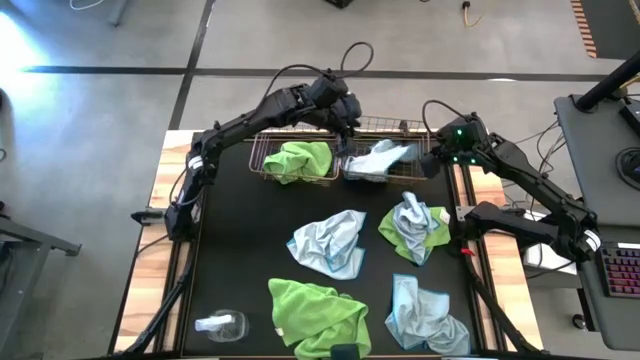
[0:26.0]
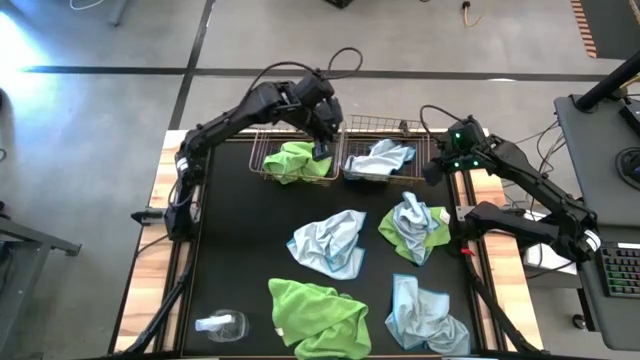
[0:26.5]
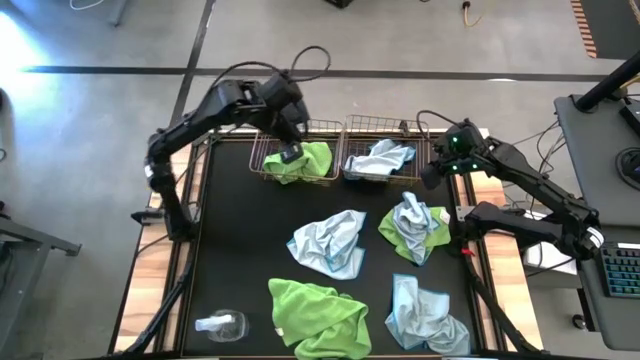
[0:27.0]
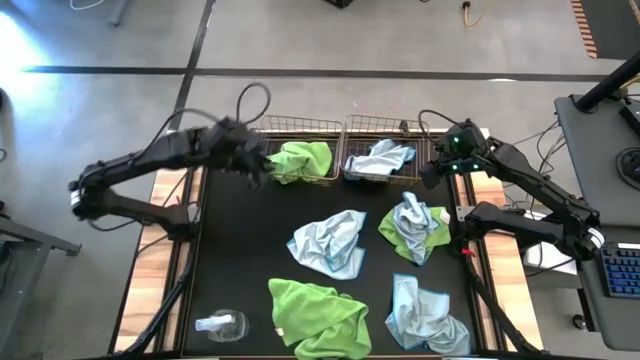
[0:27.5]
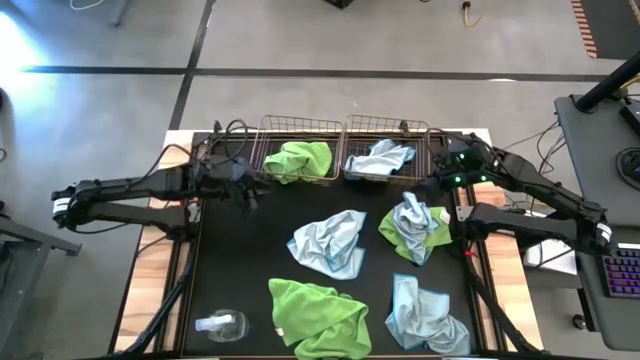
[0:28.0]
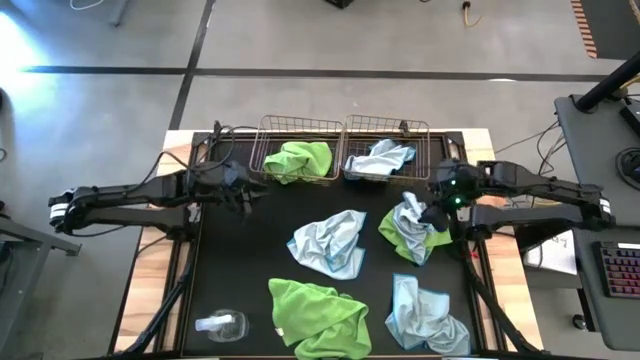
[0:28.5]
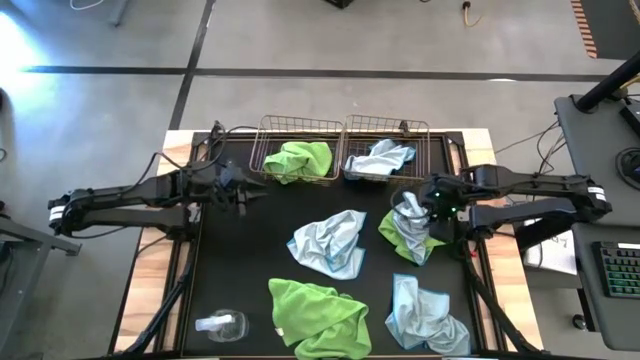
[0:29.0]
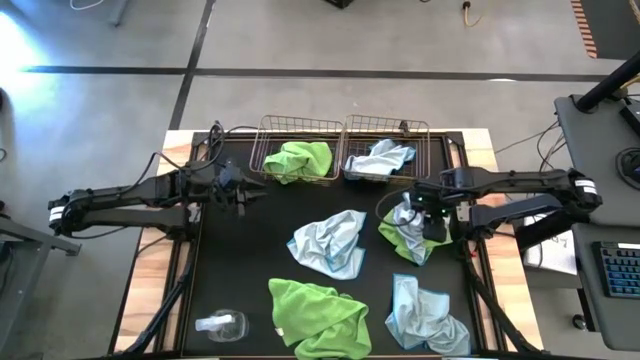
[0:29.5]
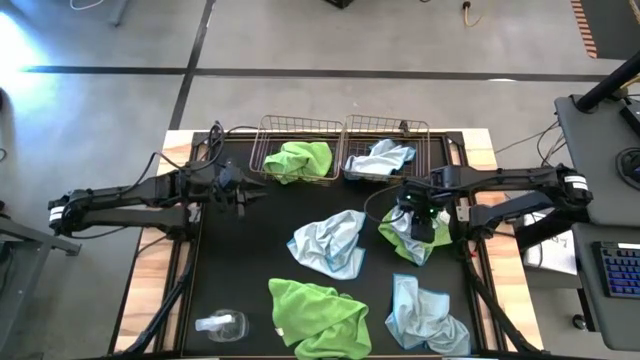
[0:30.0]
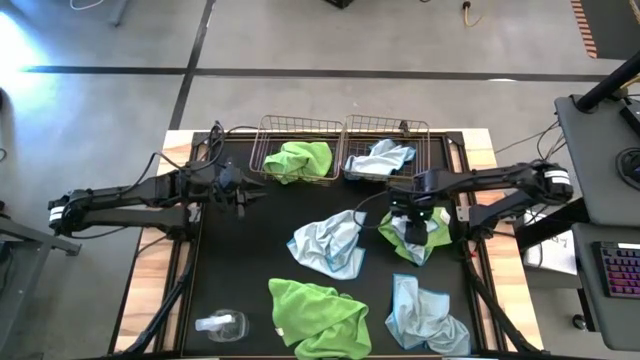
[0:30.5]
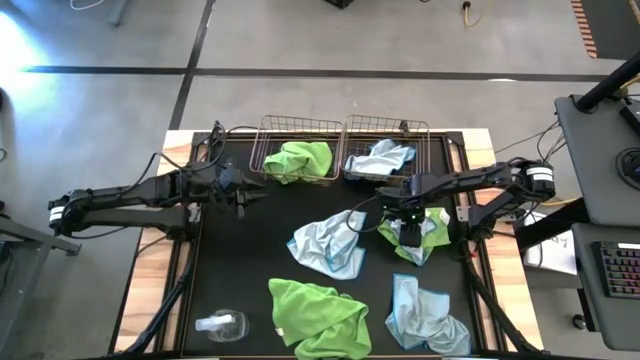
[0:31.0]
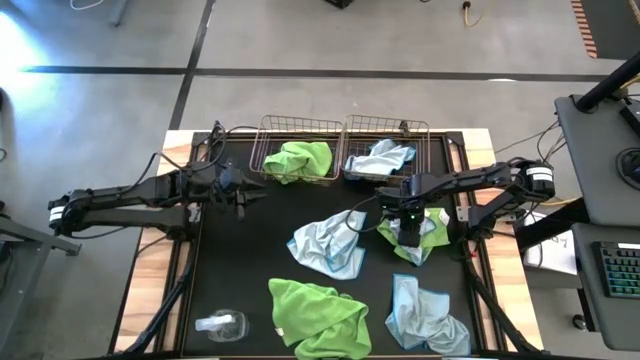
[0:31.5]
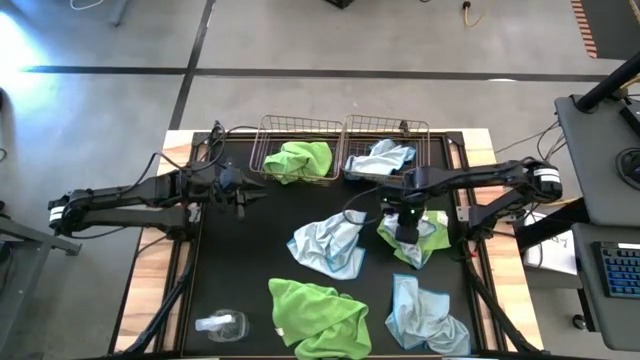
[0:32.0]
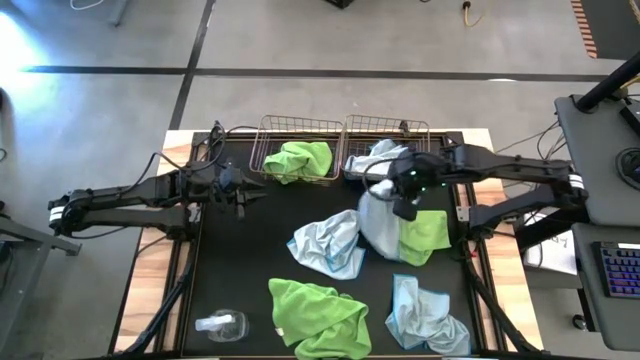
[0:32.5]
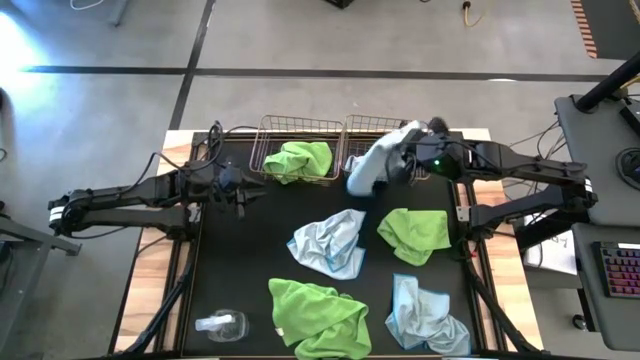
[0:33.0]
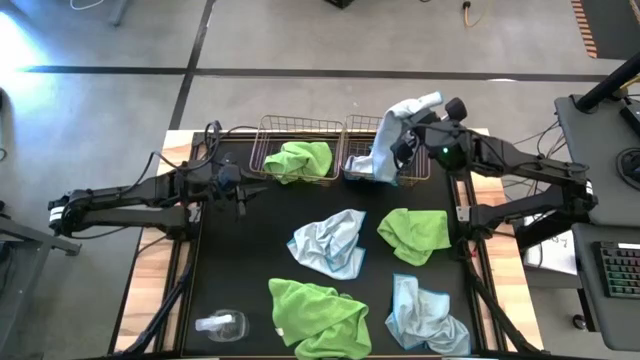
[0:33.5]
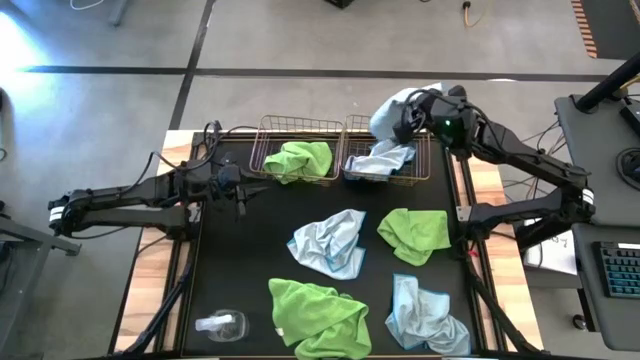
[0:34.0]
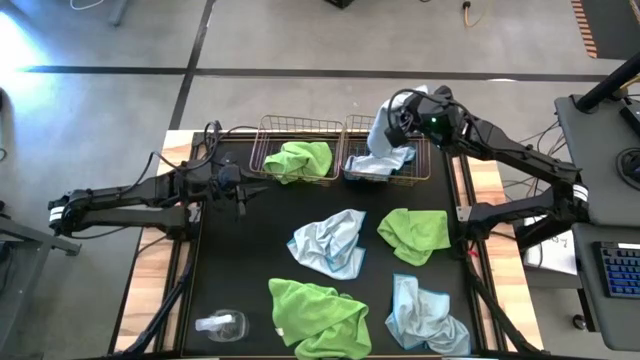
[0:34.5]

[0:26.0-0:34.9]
Task: Sort microfiber towel by color & place in baskets
Put the white microfiber cloth into the right wire basket

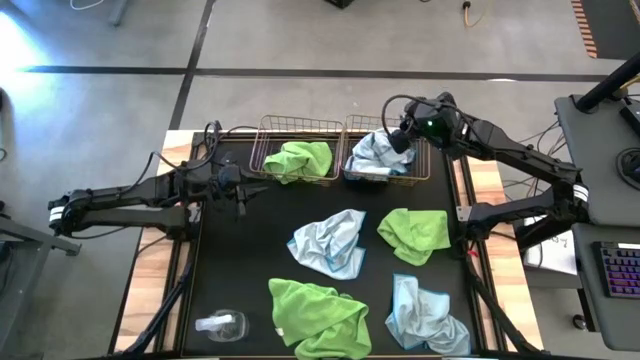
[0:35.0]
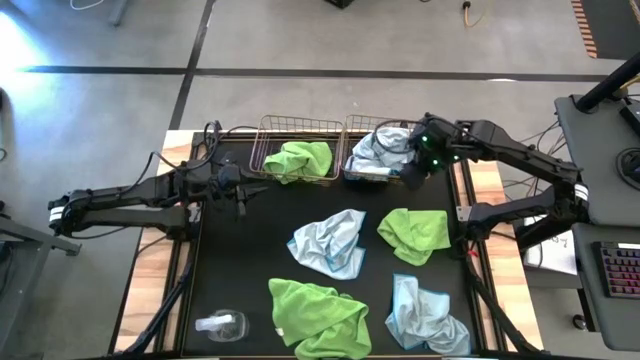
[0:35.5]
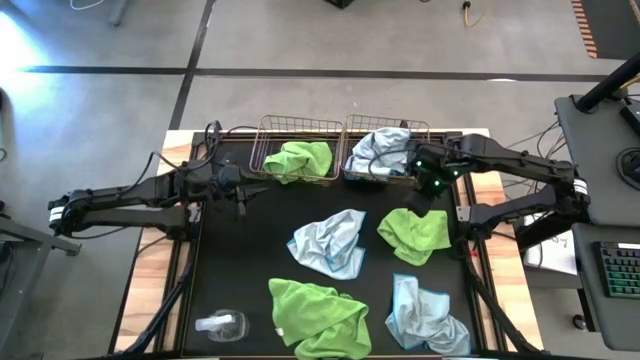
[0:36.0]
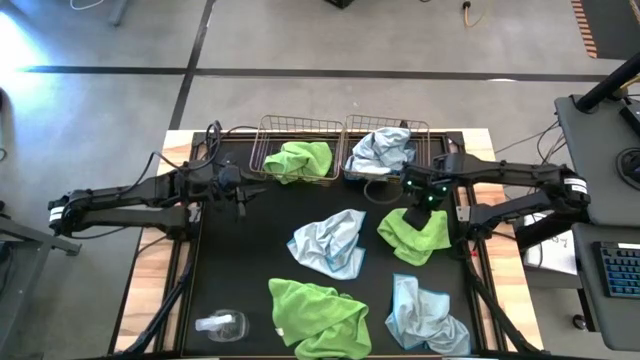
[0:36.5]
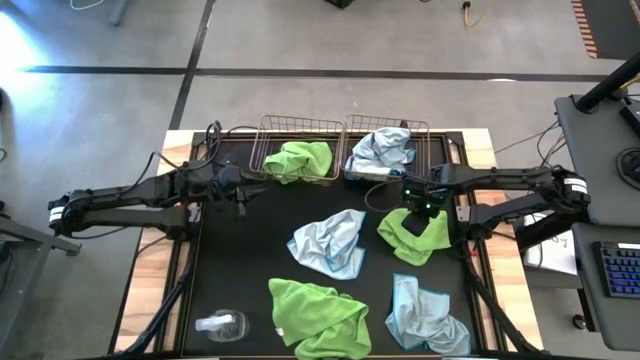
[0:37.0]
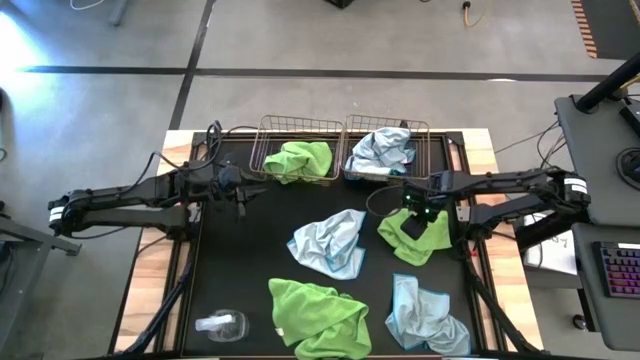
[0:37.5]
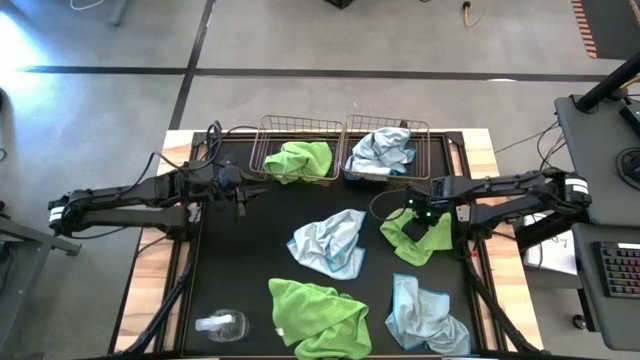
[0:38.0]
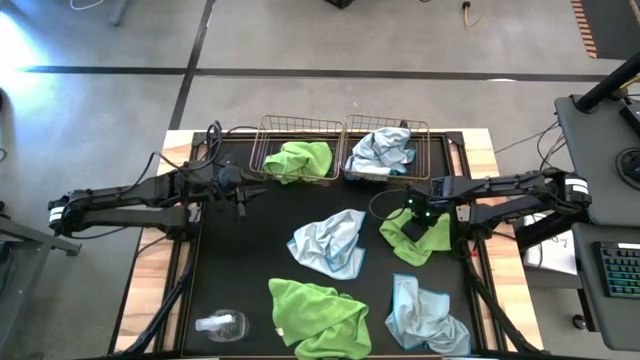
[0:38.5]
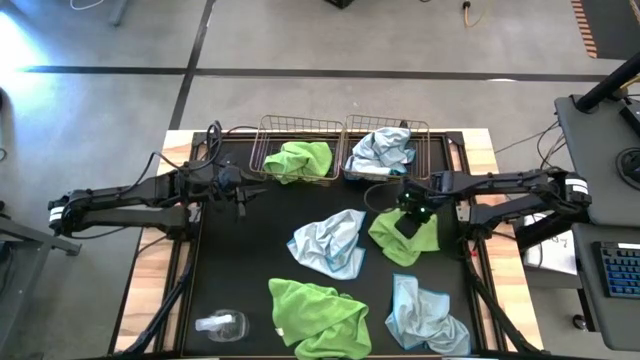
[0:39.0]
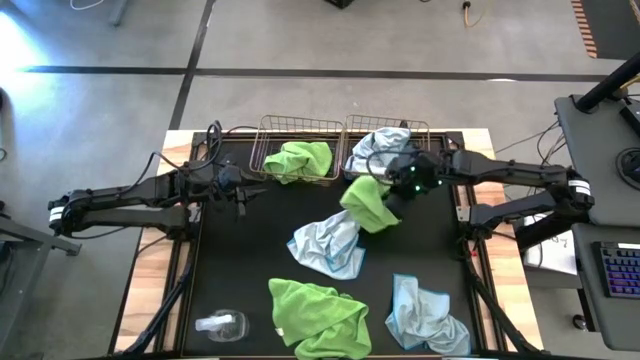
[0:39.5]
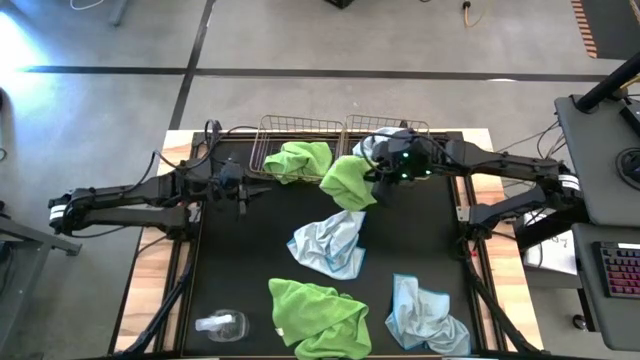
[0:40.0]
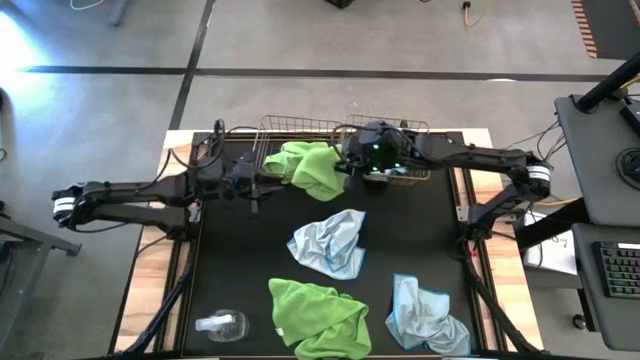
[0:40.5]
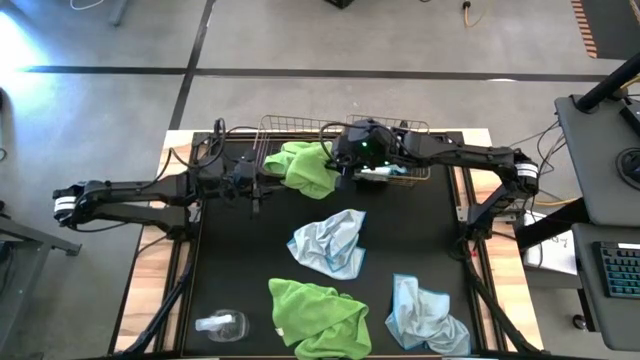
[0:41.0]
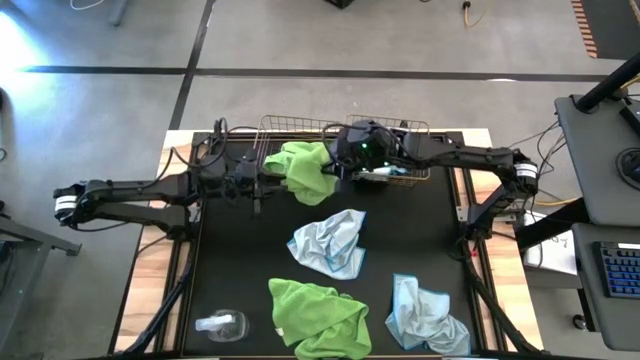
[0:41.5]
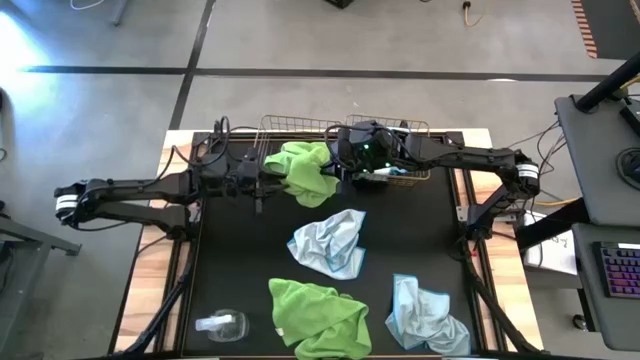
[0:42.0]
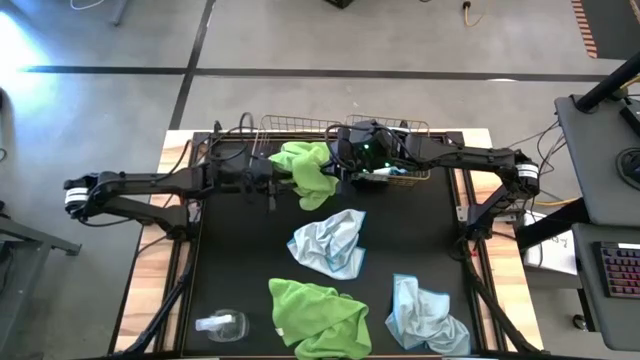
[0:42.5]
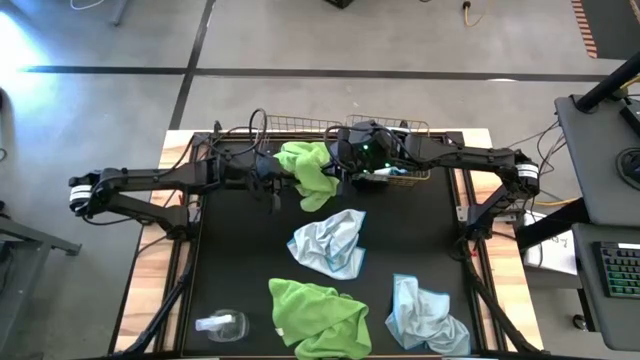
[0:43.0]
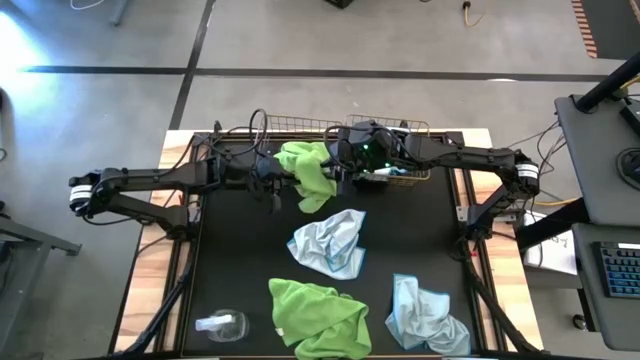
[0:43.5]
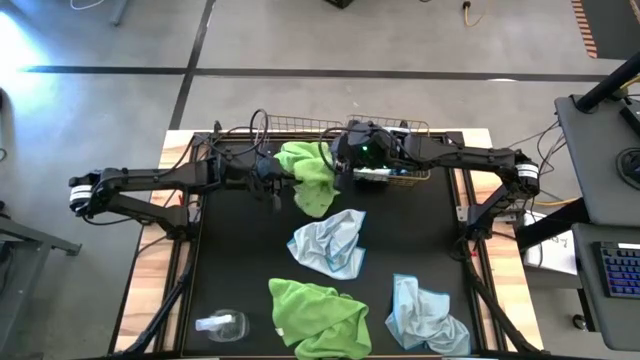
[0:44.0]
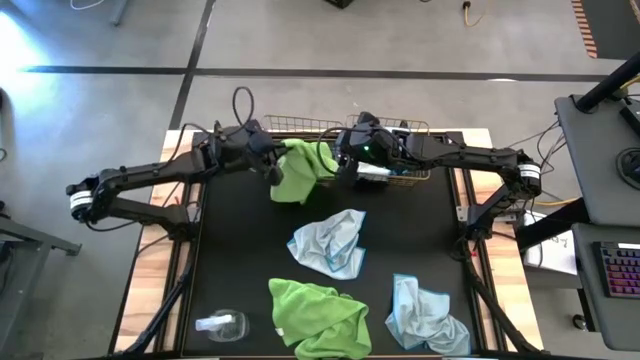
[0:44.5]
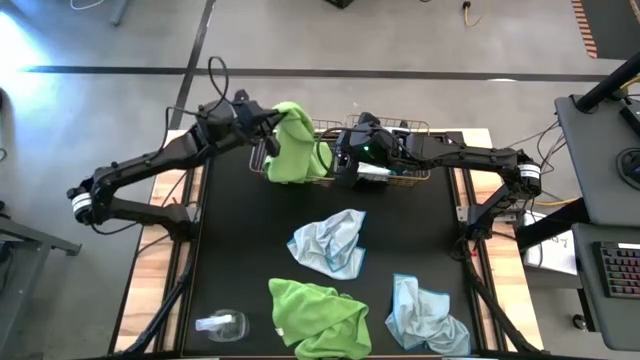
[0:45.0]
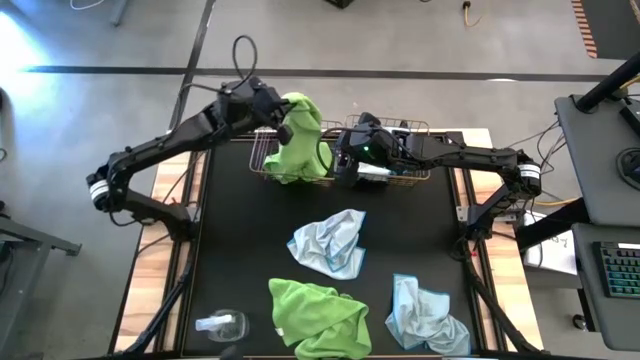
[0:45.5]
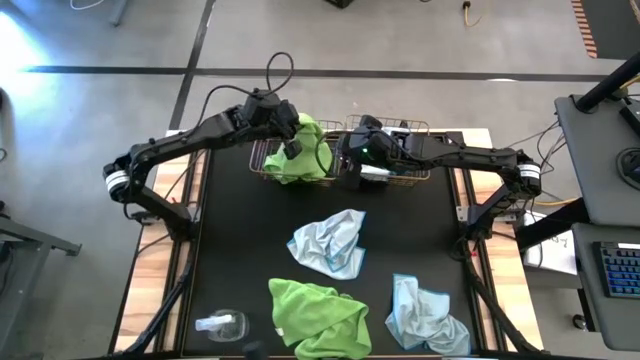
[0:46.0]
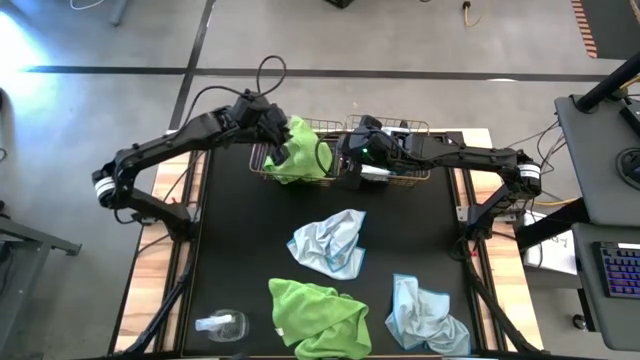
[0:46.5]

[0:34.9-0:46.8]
Put the green microfiber cloth into the left wire basket

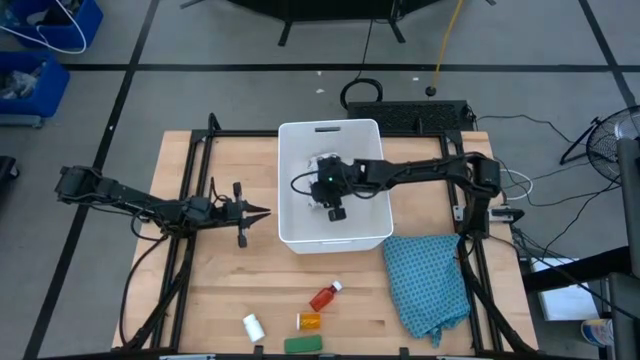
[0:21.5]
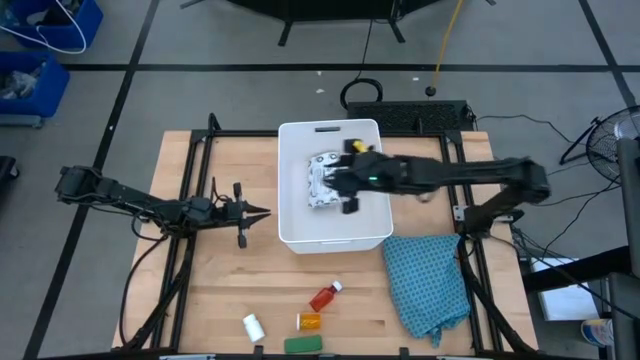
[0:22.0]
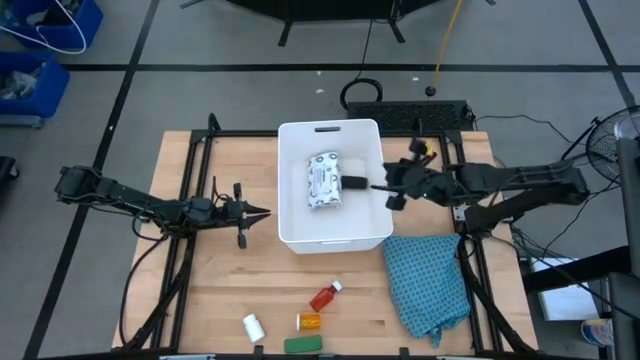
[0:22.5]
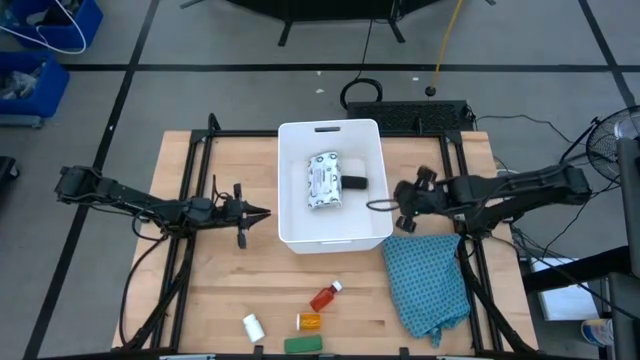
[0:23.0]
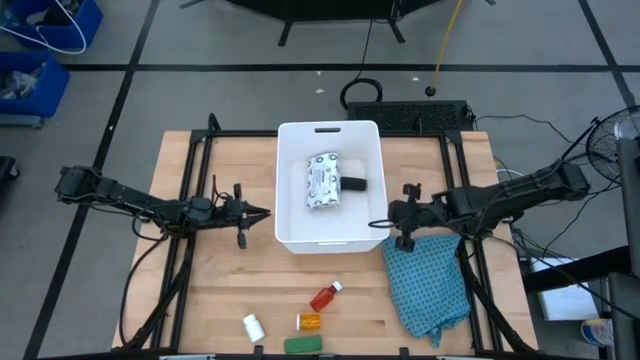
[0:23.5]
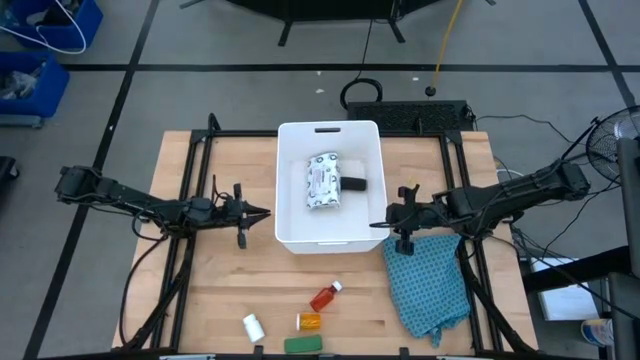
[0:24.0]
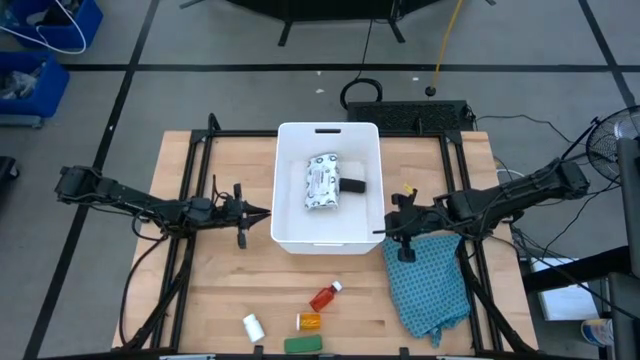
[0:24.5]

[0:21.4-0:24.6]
Task: Pick & place medical supplies in basket/bin
Adjust the white bin
